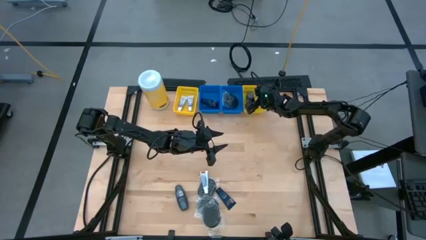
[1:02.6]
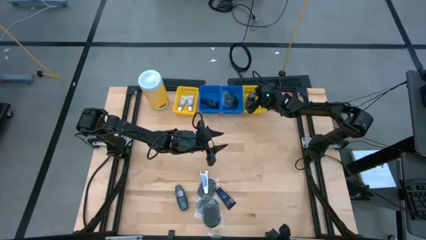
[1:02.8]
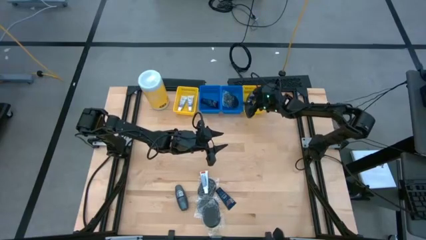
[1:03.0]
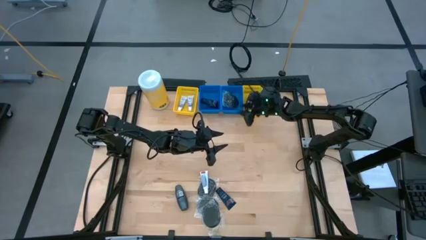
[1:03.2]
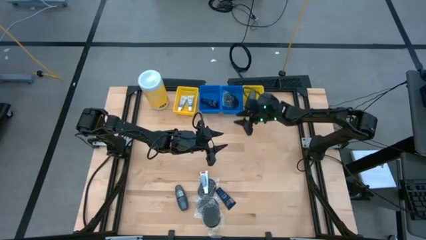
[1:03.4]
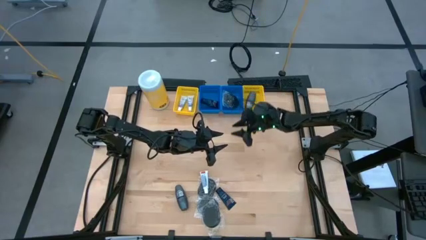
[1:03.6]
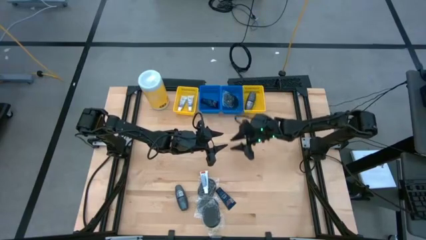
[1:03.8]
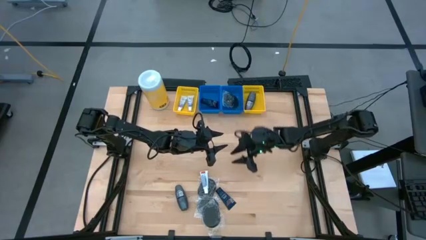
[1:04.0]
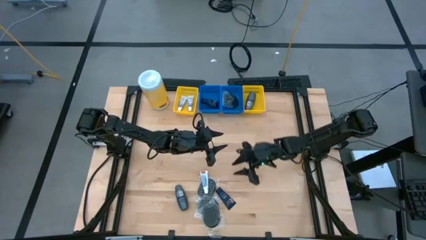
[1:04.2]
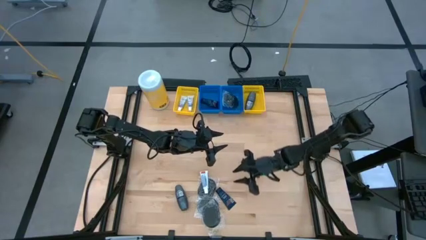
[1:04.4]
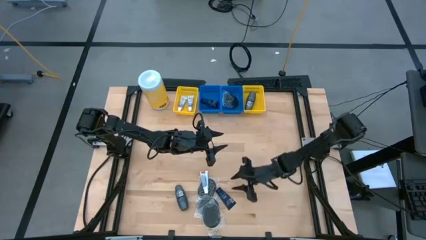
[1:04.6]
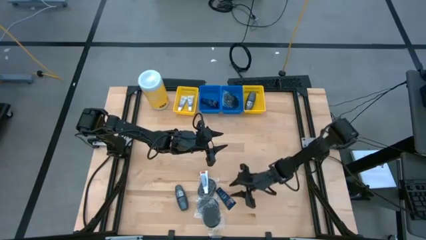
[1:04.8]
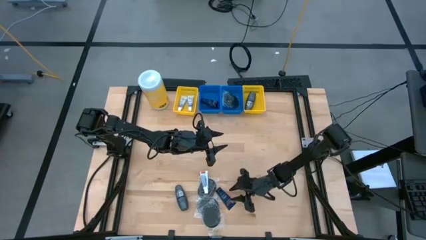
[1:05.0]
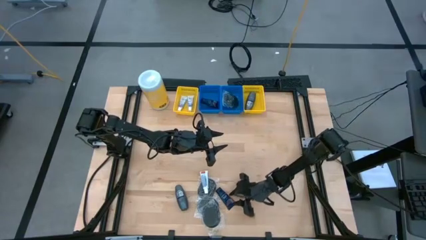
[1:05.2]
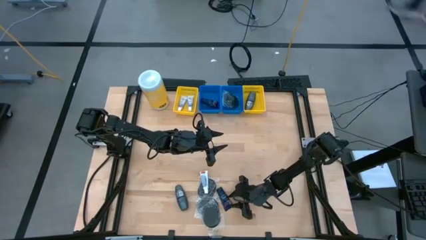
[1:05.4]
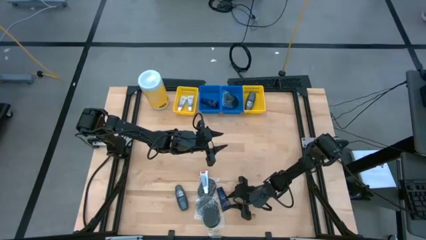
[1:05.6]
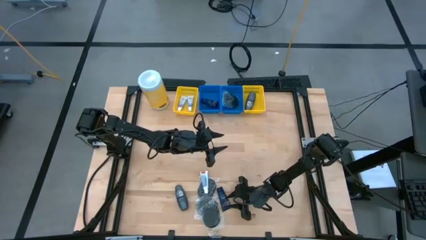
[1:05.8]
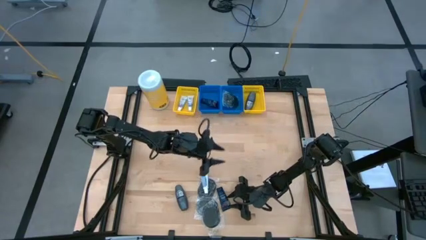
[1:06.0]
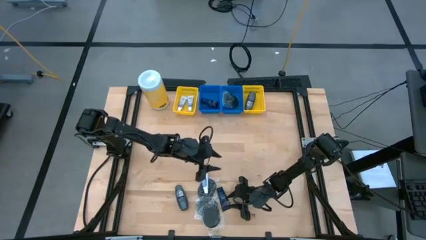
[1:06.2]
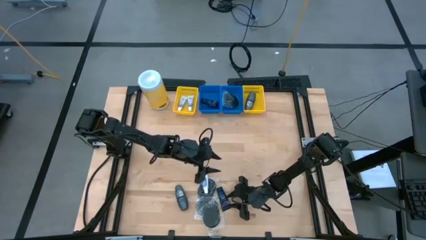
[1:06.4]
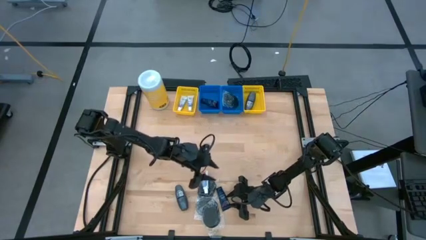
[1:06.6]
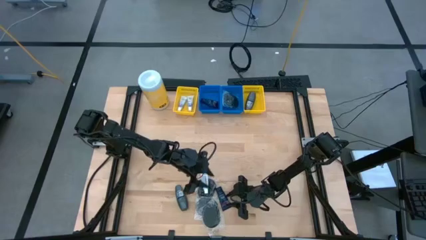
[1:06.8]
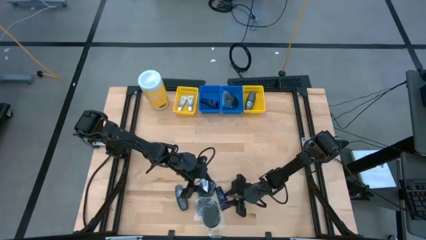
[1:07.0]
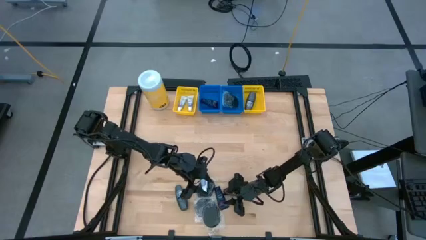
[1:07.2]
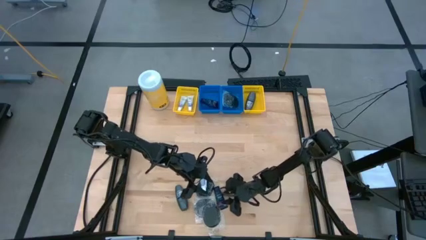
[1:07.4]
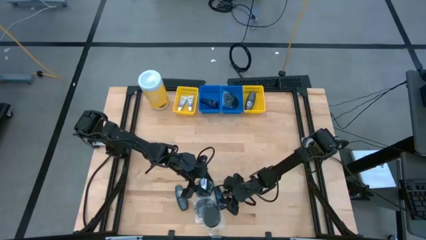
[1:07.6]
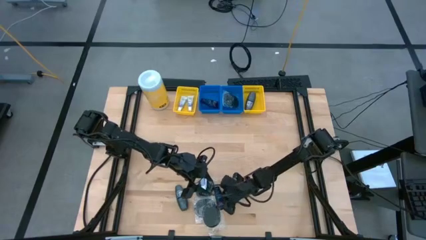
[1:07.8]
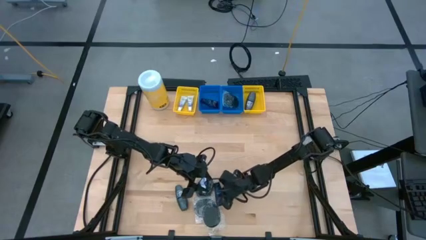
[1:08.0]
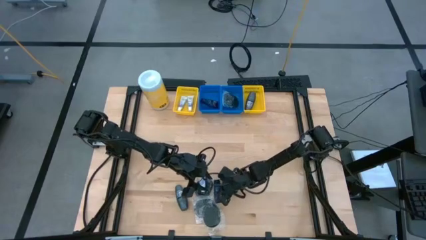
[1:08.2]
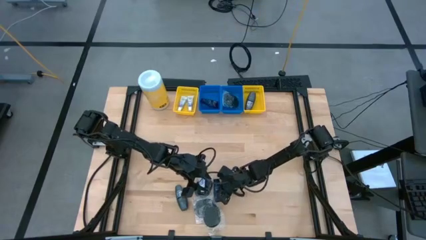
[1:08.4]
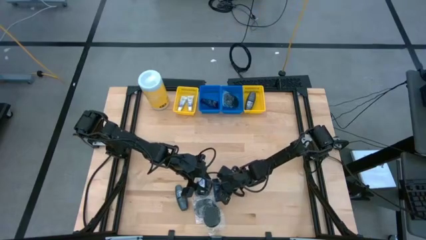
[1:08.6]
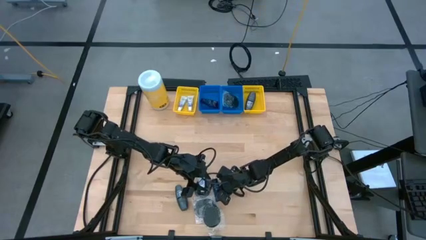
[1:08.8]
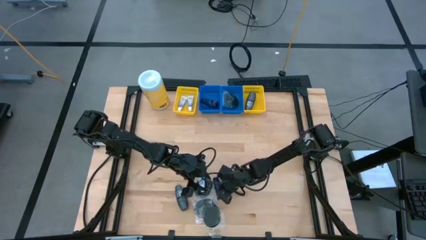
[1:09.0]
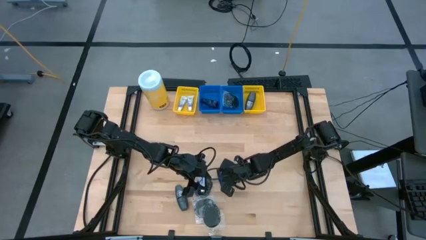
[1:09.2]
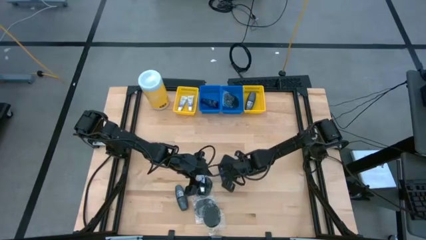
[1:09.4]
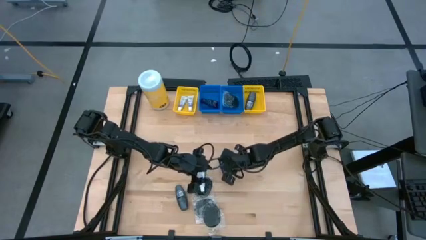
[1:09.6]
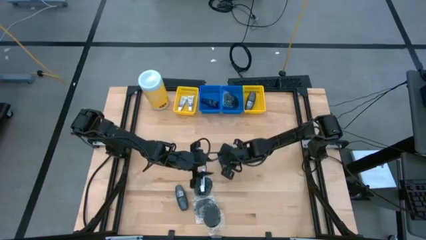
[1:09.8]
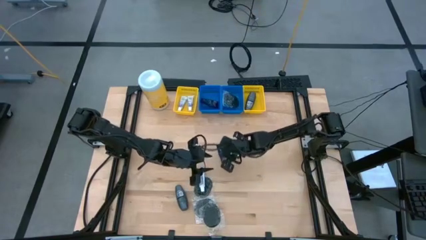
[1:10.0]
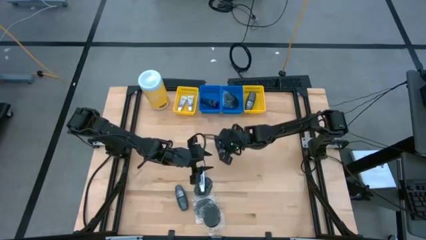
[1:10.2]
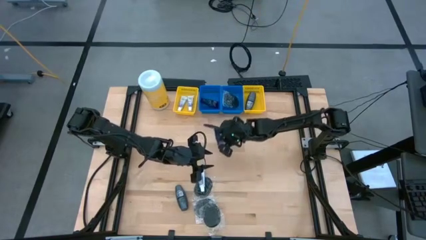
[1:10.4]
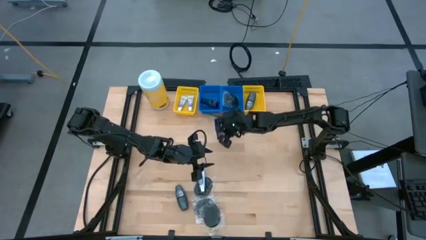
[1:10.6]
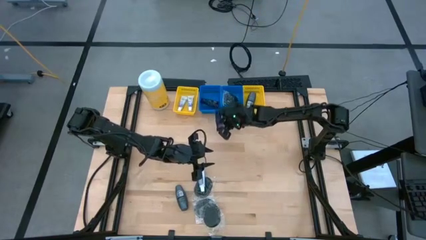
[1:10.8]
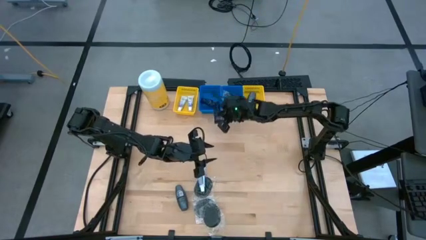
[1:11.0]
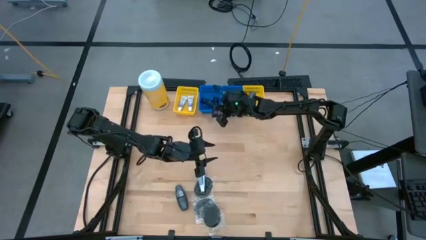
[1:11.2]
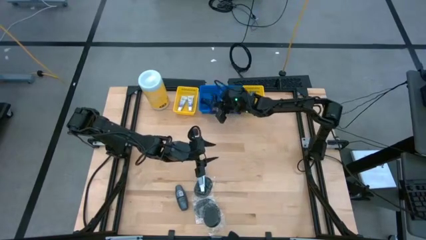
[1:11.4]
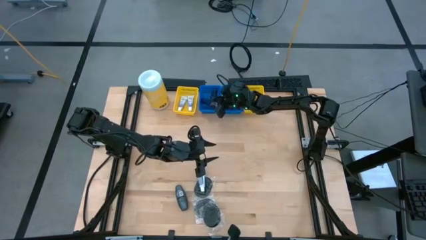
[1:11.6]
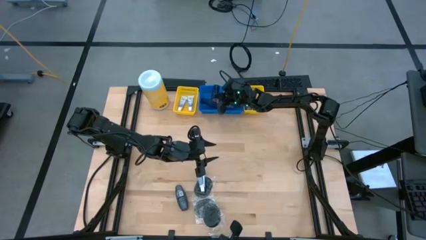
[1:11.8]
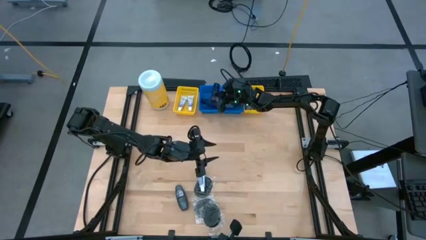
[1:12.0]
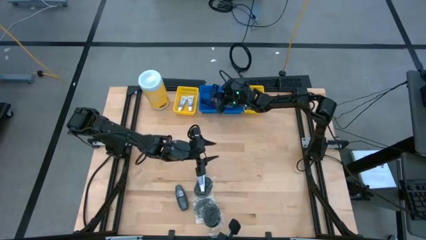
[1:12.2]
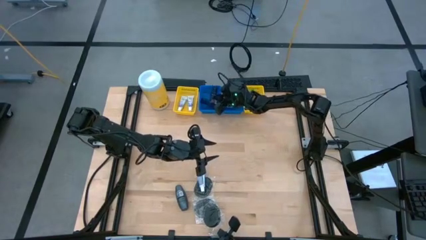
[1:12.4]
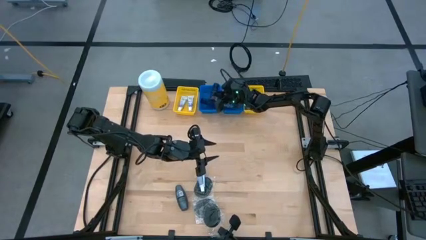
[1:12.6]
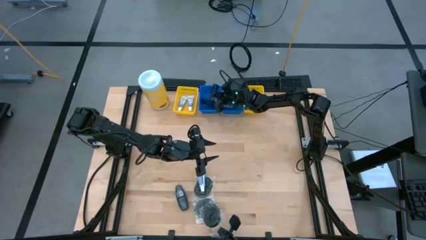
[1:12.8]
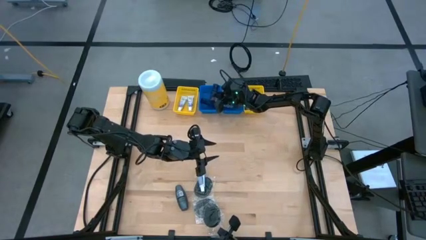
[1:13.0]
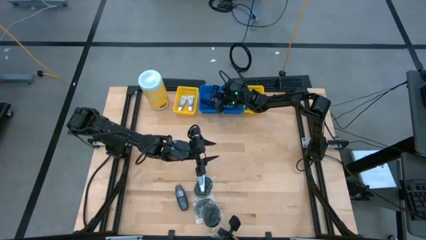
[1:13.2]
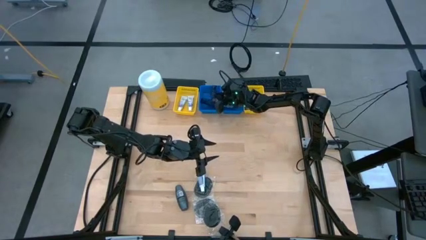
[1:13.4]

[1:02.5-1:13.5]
Task: Pick & Place Travel size toiletries
Put the shave cream into the left blue bin

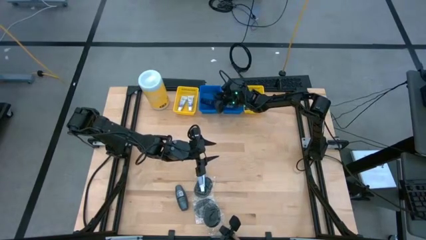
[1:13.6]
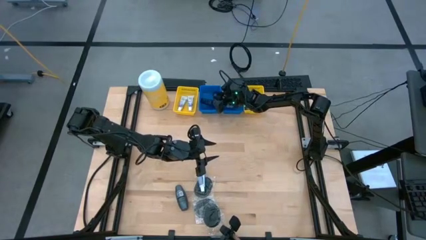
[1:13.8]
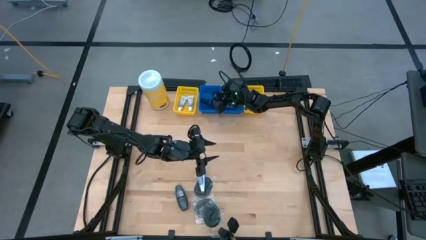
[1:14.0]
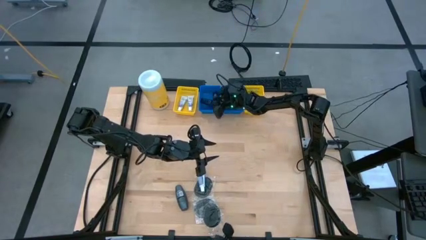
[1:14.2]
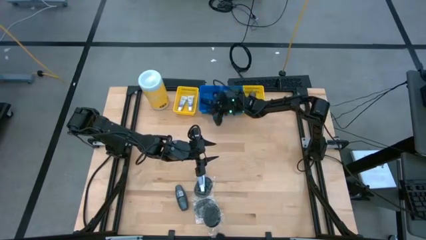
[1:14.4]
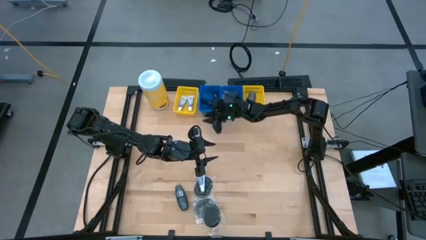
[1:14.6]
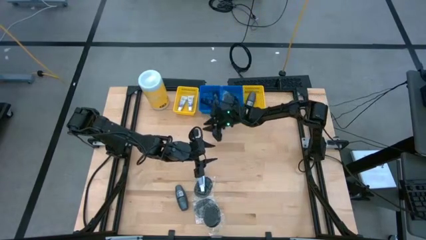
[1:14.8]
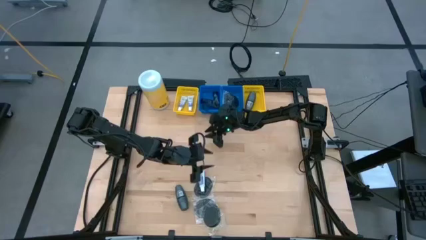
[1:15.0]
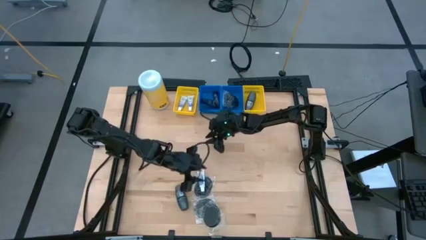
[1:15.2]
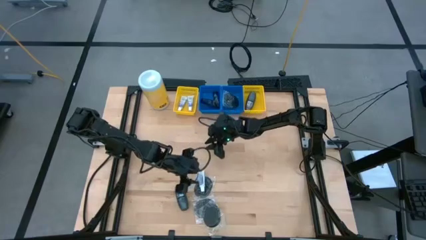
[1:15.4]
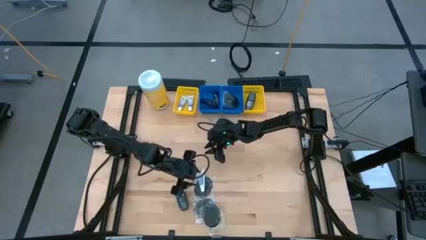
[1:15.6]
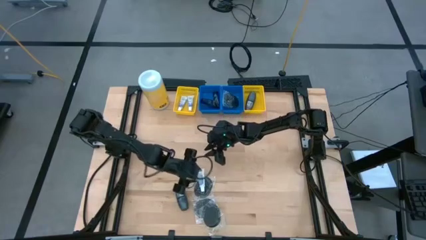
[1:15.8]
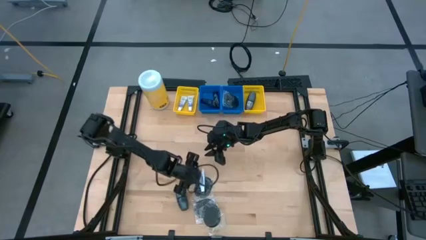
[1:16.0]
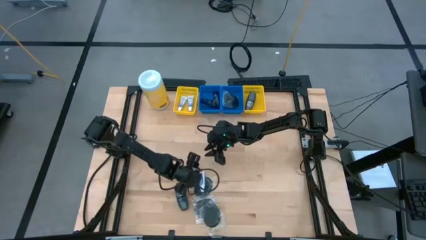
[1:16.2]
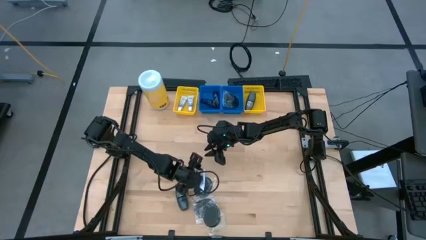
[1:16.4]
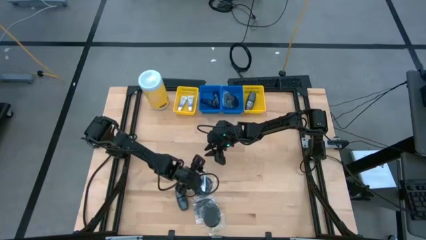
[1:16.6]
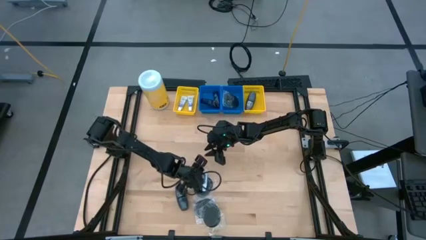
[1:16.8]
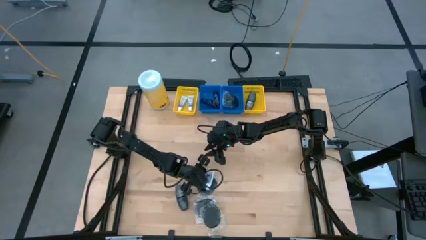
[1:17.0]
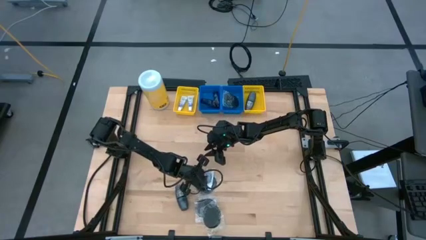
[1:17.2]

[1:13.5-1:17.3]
Put the toothpaste into the left yellow bin
